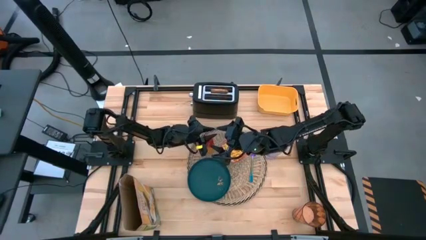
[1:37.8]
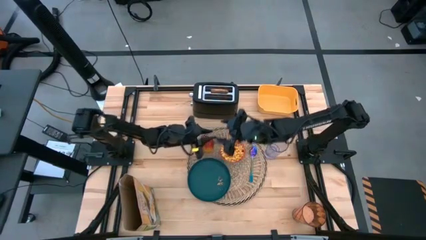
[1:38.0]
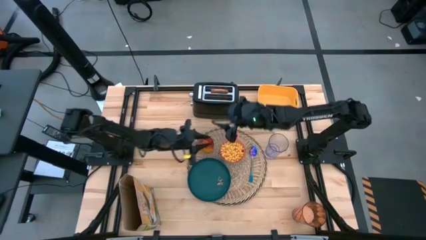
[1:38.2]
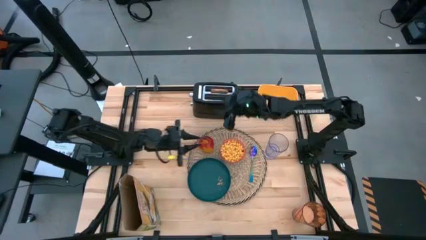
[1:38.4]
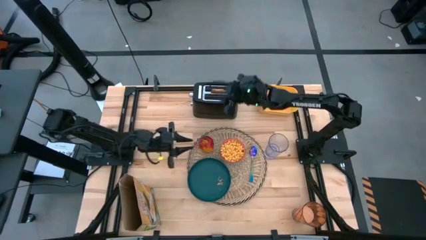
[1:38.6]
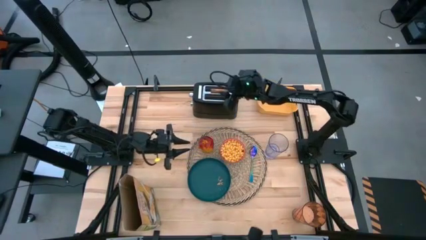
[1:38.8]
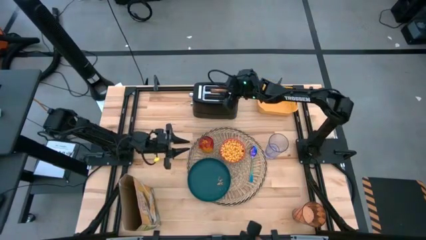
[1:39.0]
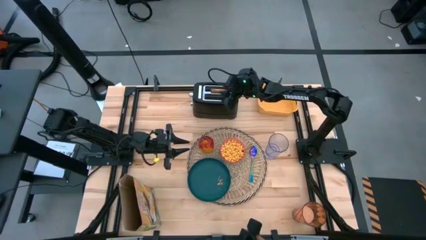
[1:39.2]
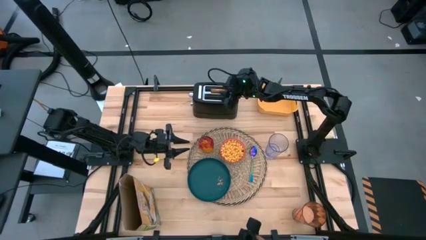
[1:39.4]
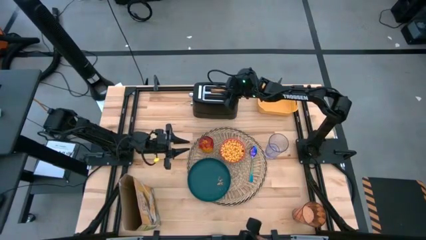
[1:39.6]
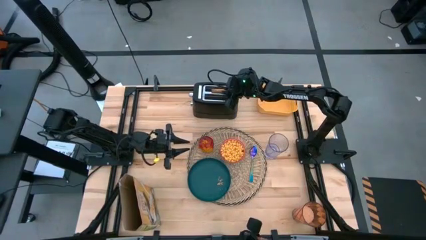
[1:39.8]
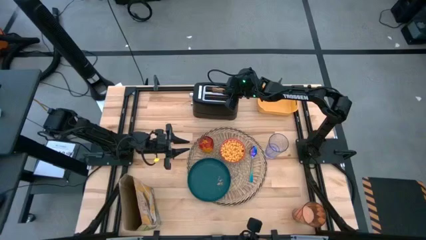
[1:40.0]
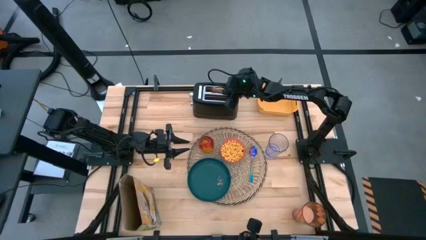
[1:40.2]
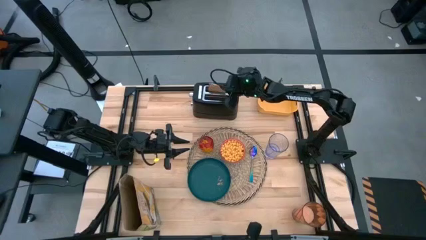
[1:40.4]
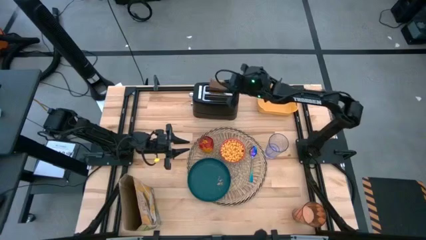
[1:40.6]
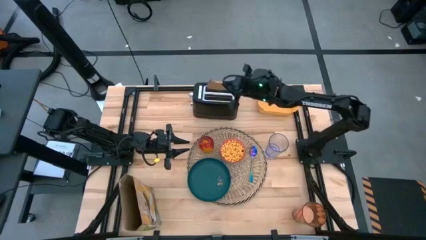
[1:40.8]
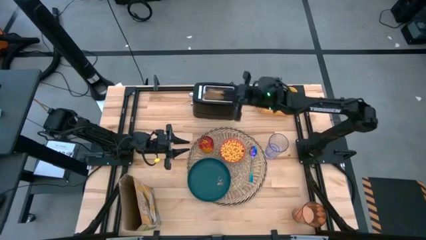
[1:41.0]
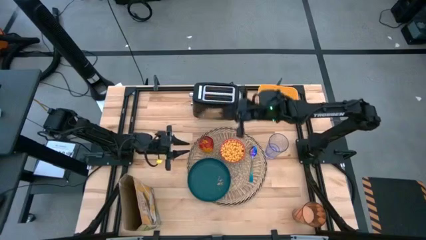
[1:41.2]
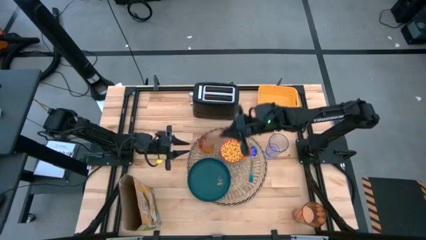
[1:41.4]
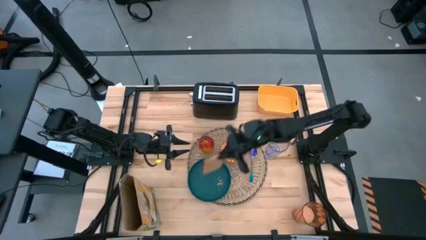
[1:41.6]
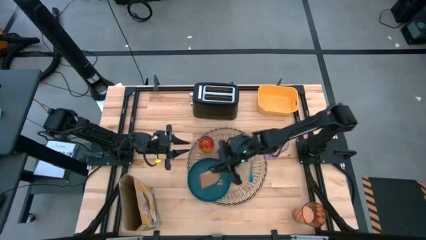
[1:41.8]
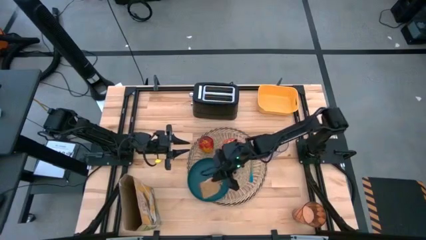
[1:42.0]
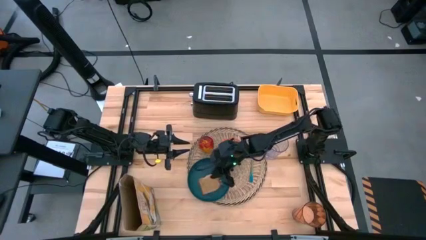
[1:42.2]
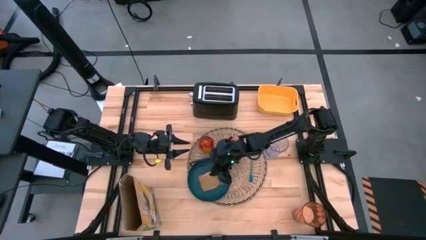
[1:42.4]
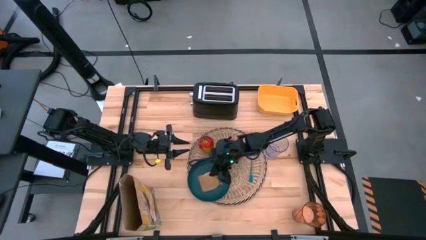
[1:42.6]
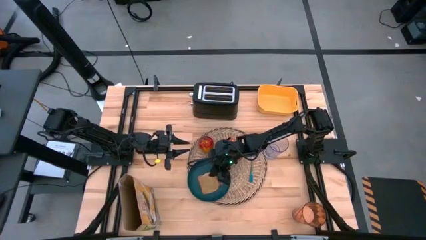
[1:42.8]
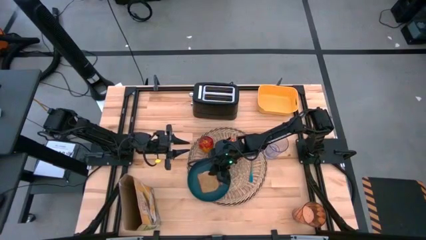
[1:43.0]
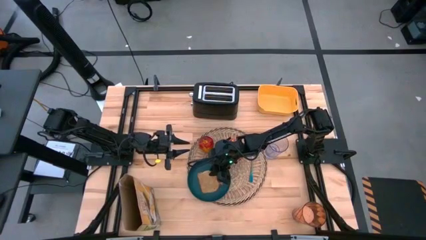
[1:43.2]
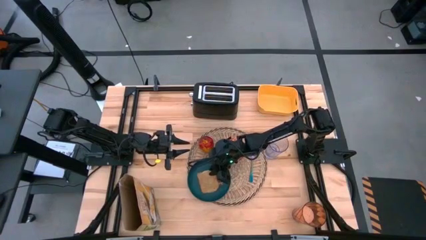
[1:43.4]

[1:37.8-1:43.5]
Task: Arrange a breakfast setting
Put the toasted bread on the blue plate

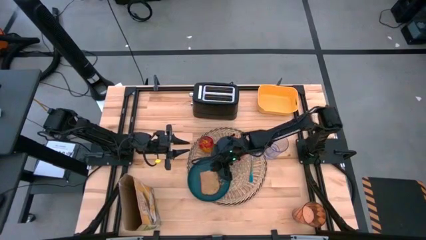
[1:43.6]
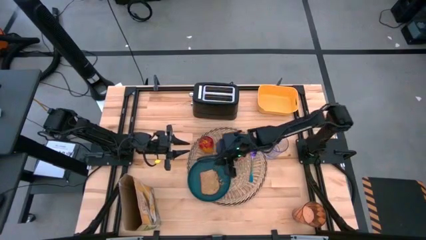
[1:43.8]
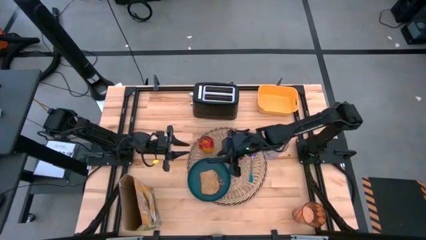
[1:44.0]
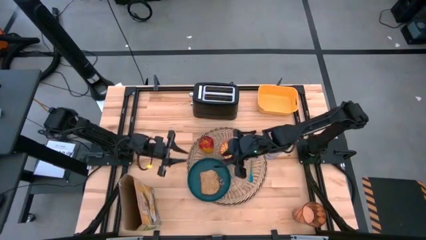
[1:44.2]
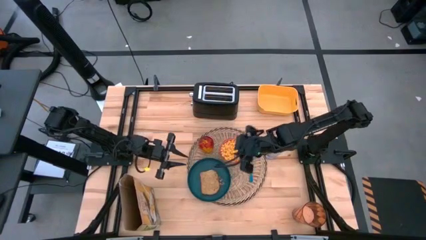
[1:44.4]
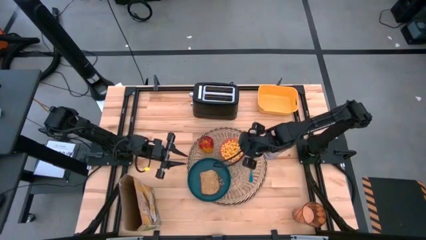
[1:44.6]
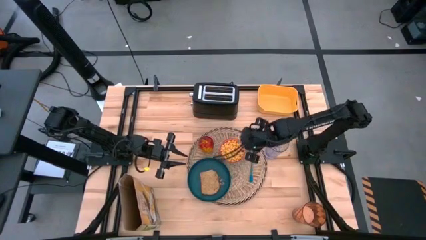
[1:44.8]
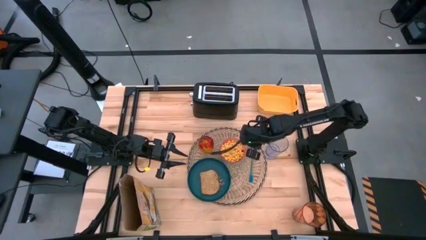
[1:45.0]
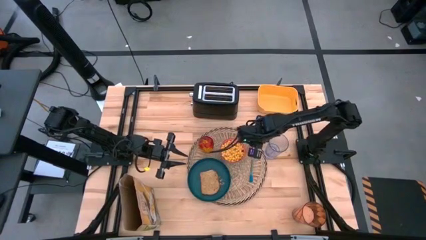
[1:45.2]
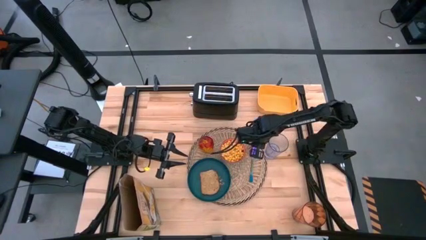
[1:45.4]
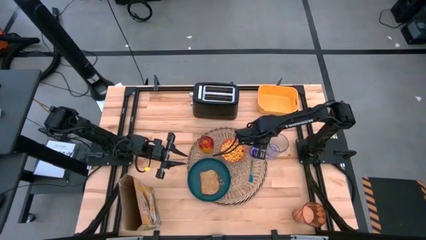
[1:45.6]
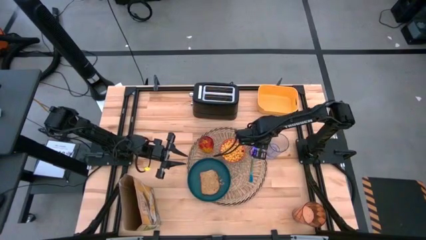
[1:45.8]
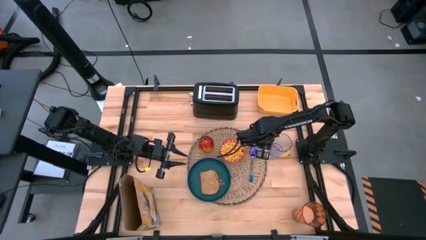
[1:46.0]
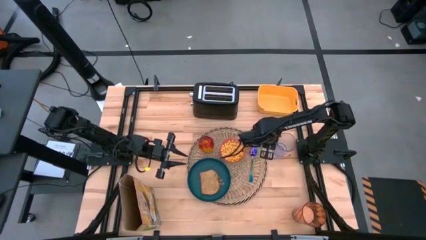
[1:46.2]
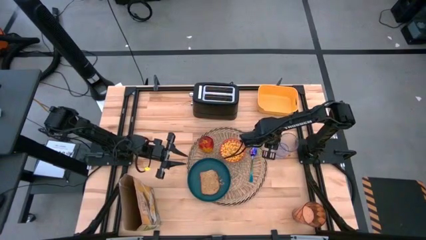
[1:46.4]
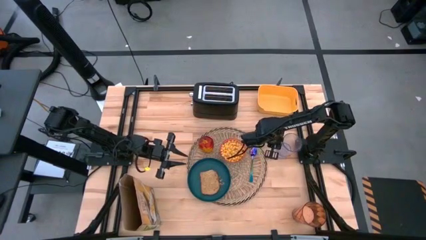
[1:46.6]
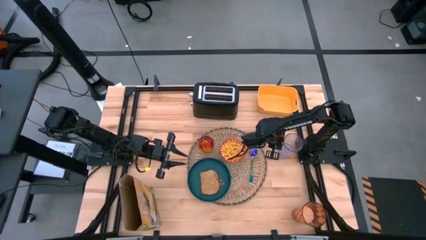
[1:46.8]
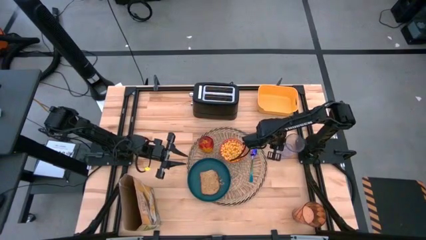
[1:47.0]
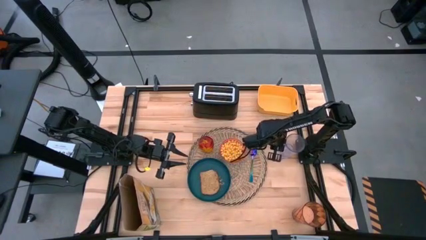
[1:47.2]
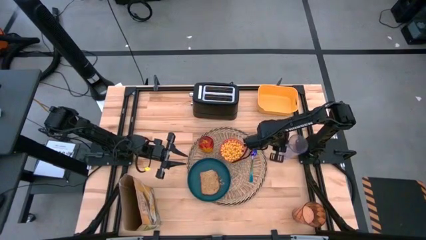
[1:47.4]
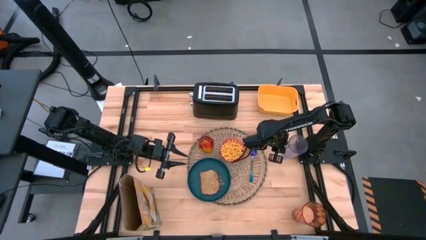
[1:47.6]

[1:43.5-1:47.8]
Adjust the transparent cup to the middle left of the table

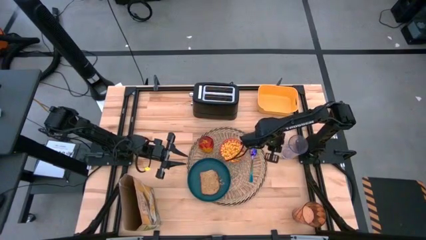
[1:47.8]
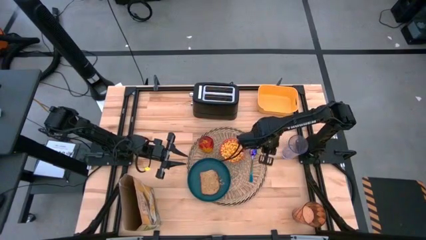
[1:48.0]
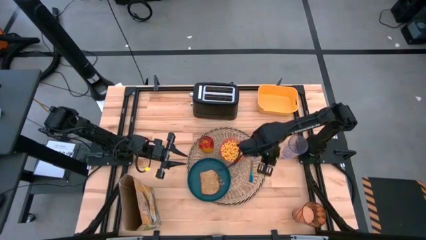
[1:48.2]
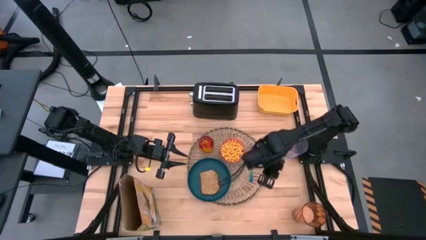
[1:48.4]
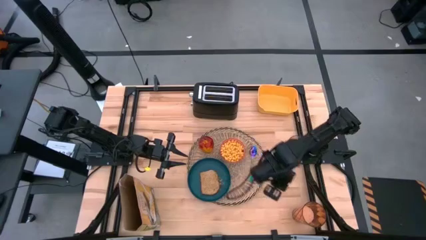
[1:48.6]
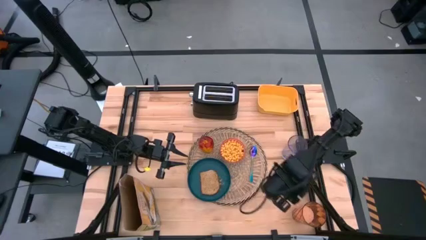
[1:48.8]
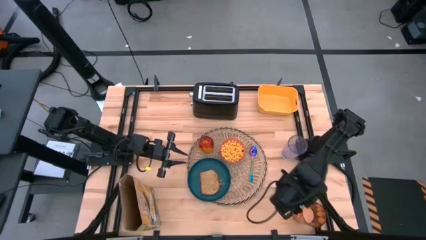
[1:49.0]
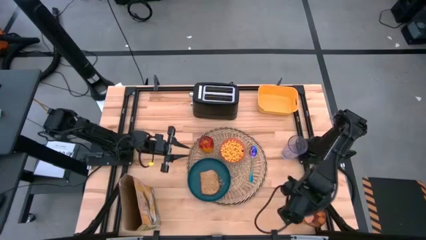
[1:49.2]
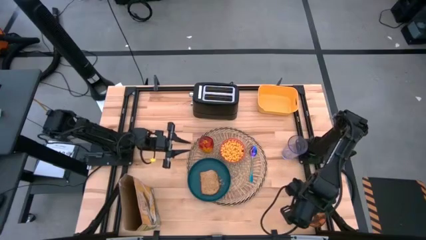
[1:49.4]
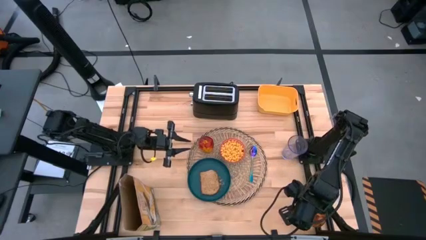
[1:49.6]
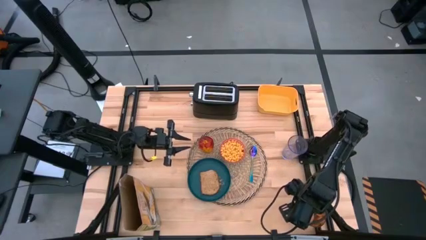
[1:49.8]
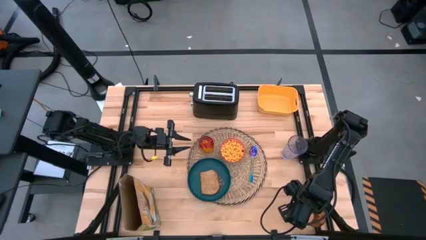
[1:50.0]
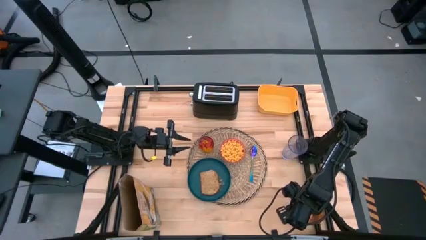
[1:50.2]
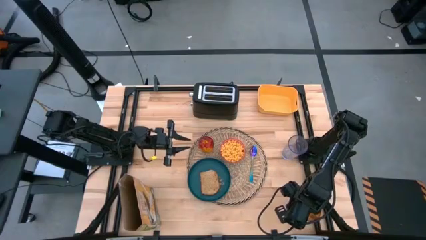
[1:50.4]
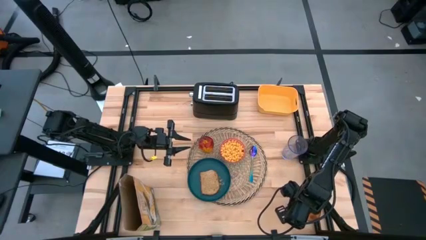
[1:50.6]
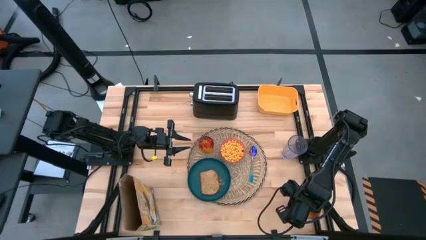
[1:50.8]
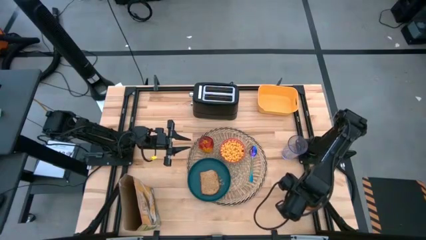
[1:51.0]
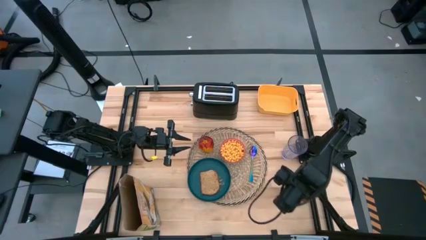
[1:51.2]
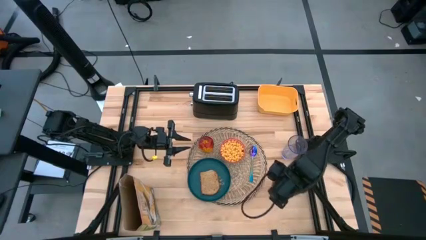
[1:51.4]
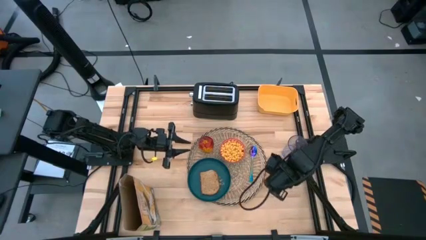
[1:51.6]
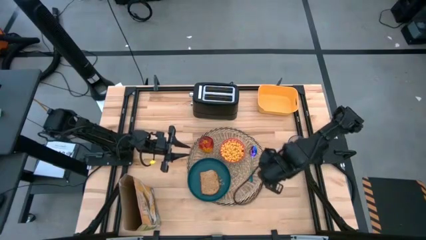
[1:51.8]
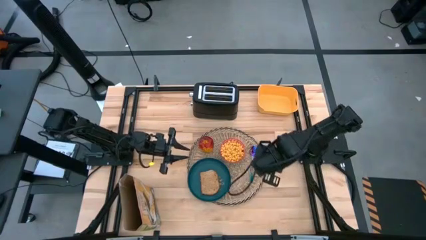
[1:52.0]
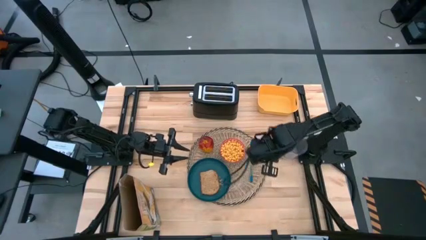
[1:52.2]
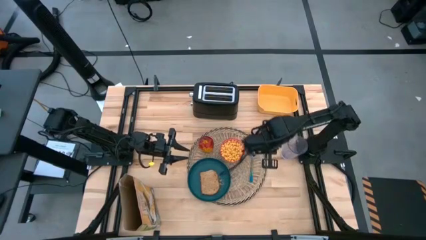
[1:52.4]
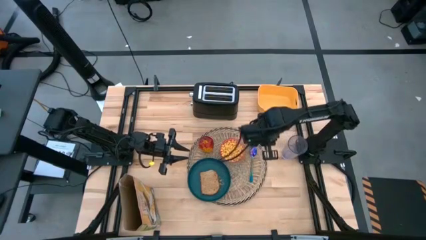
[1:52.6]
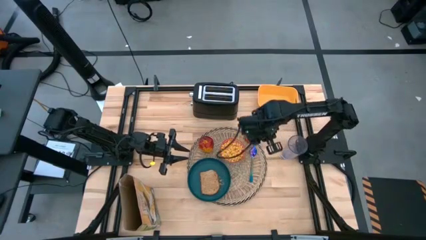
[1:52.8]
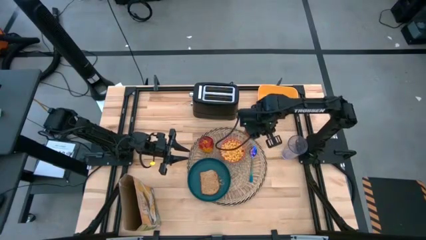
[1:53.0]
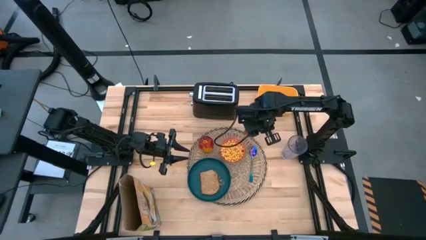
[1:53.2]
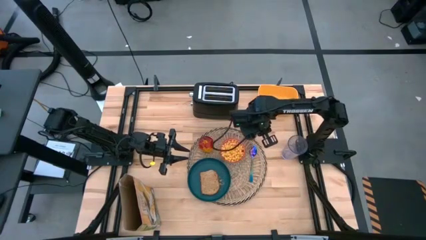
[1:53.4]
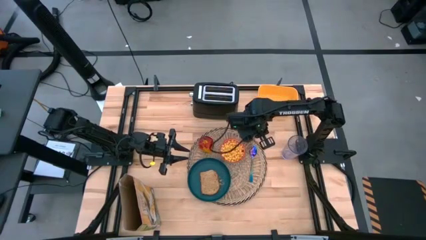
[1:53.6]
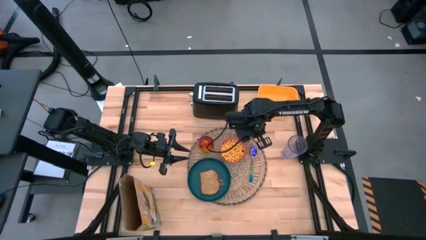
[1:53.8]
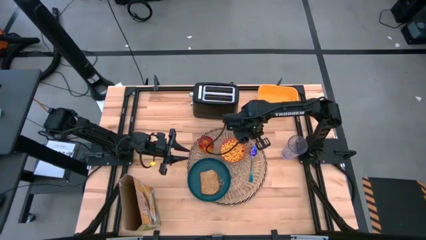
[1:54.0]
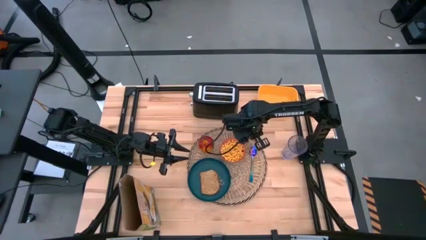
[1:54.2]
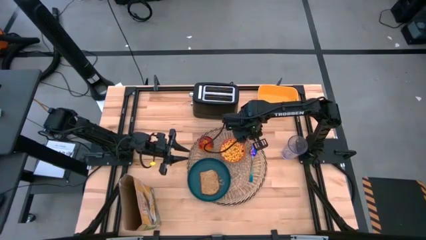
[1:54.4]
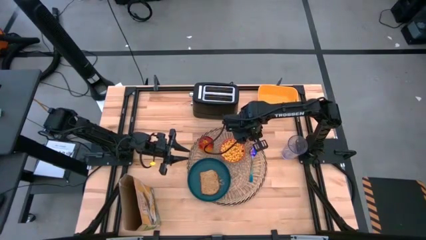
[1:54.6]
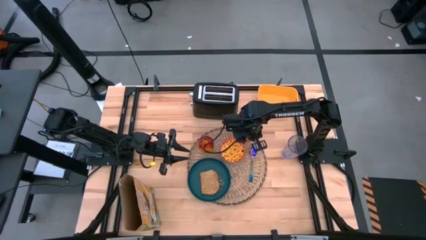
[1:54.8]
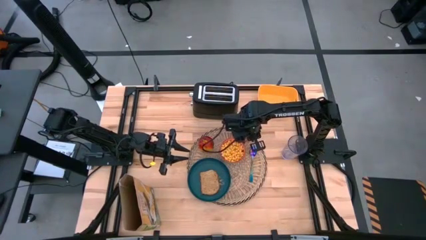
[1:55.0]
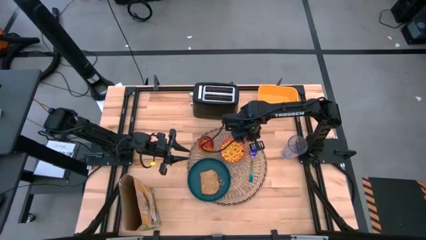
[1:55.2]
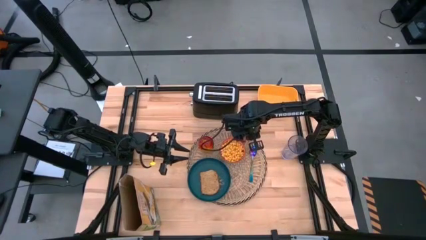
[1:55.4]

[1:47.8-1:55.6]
Put the orange cup on the brown table mat to the top of the red bowl
